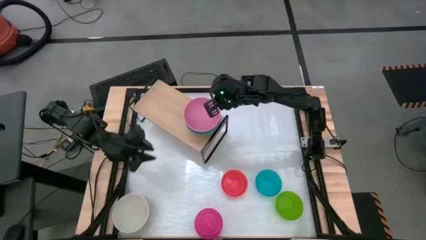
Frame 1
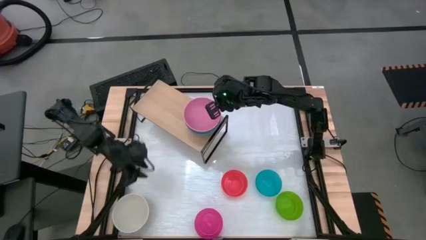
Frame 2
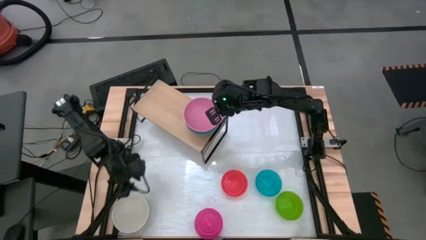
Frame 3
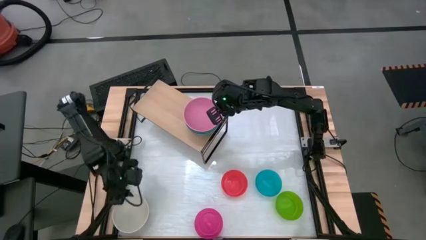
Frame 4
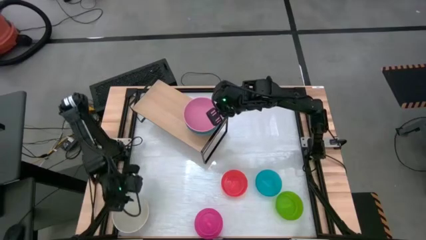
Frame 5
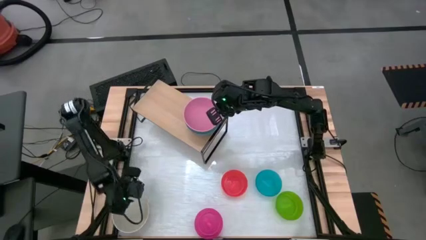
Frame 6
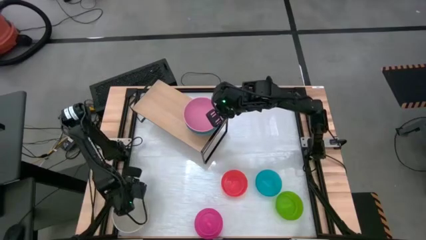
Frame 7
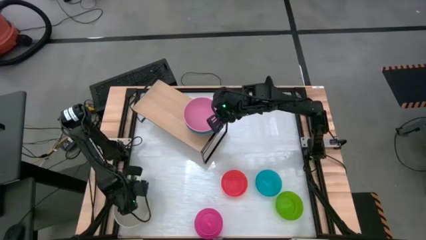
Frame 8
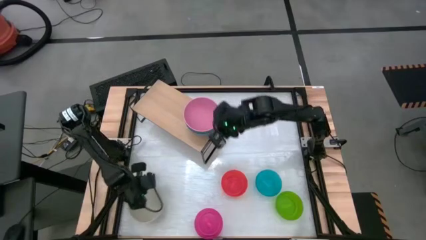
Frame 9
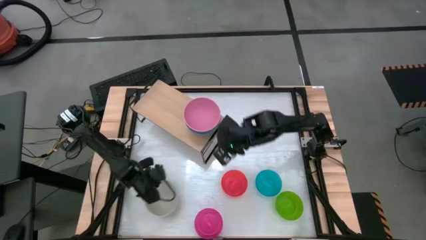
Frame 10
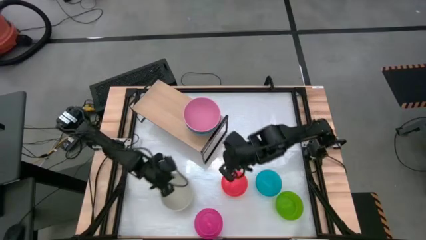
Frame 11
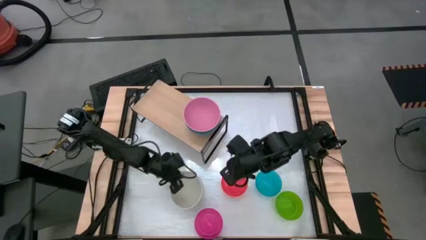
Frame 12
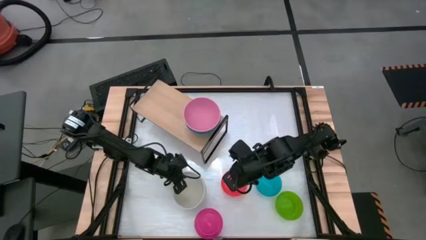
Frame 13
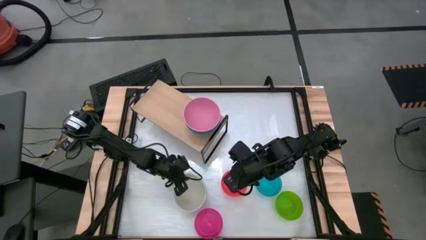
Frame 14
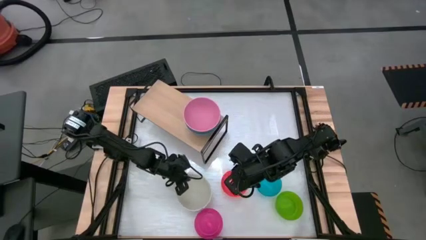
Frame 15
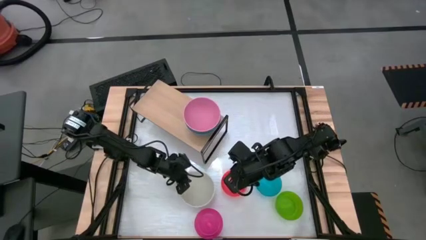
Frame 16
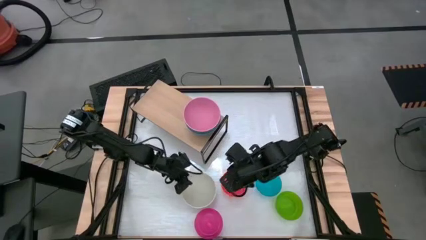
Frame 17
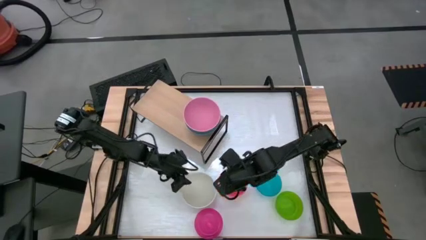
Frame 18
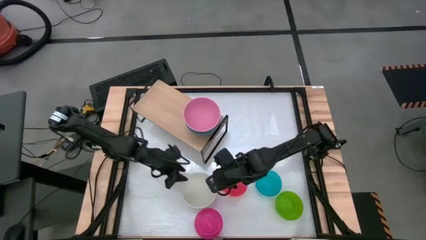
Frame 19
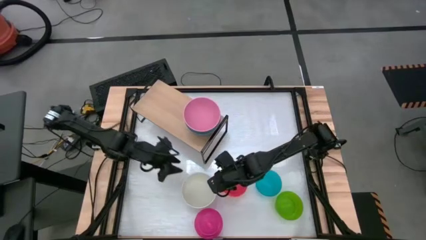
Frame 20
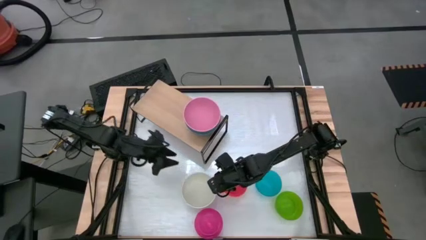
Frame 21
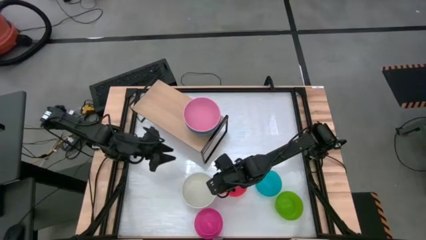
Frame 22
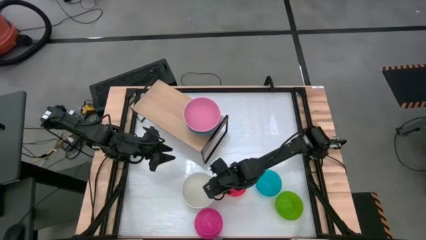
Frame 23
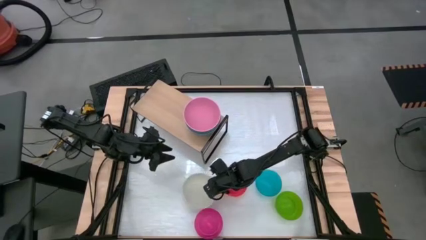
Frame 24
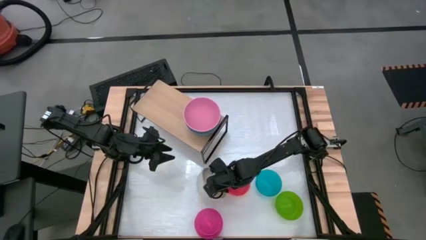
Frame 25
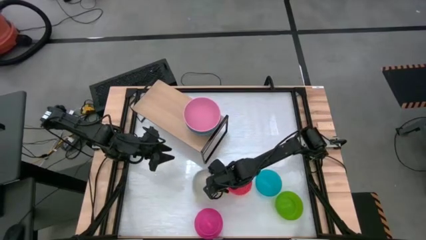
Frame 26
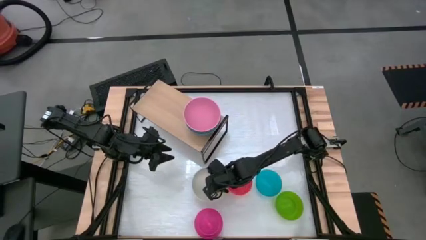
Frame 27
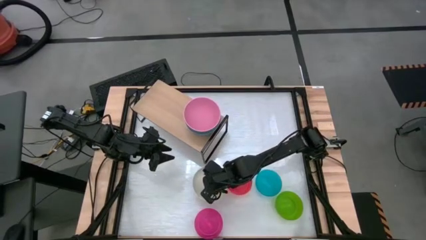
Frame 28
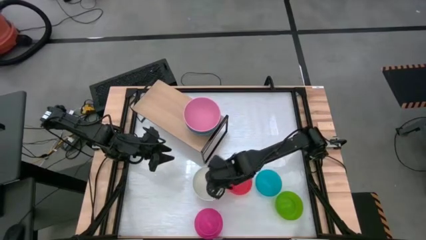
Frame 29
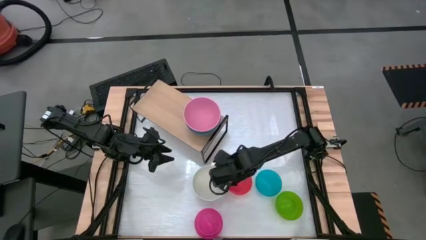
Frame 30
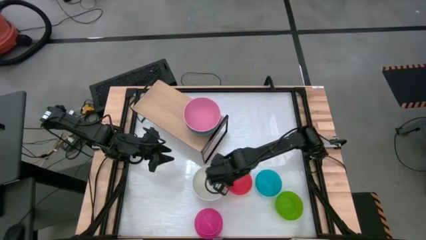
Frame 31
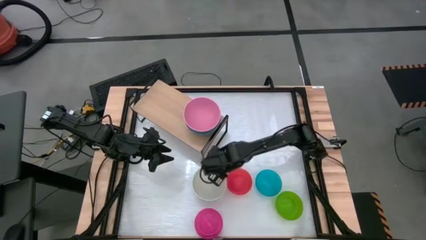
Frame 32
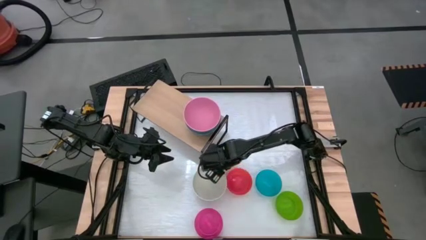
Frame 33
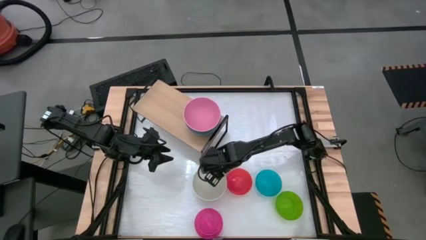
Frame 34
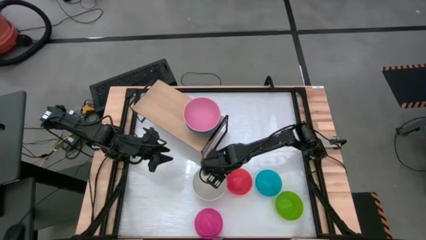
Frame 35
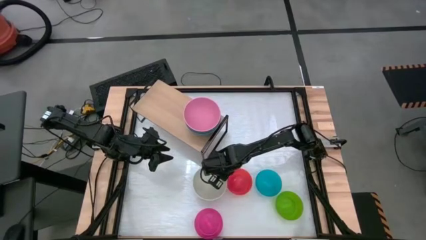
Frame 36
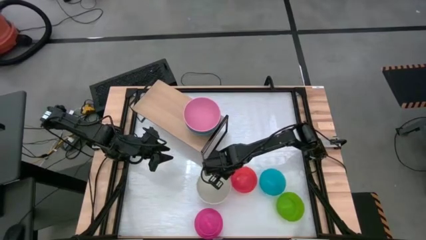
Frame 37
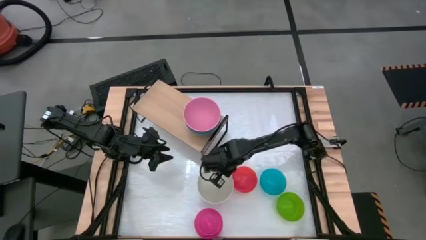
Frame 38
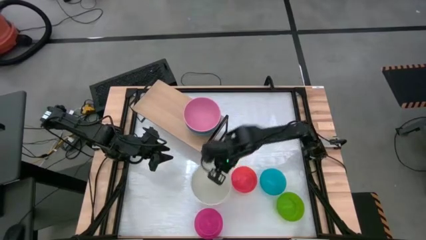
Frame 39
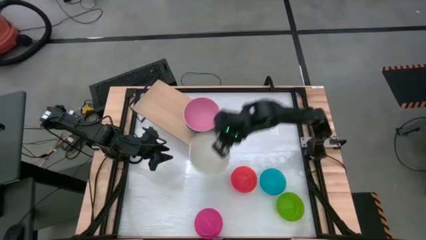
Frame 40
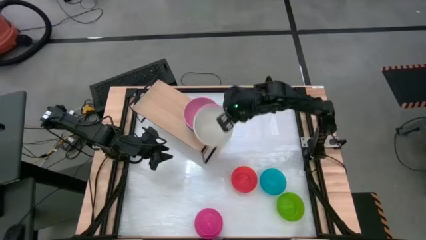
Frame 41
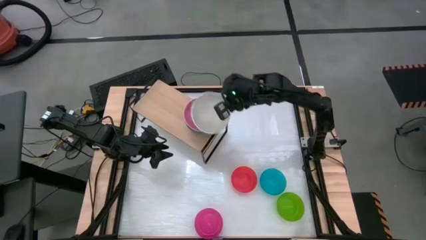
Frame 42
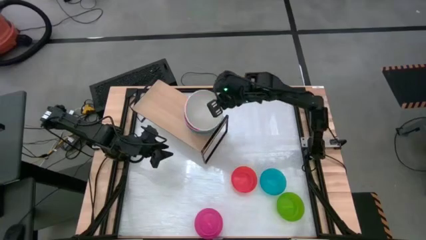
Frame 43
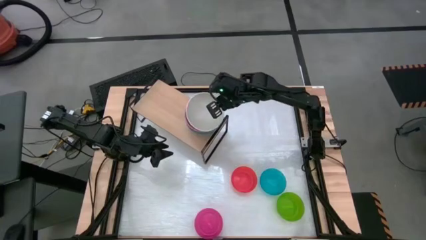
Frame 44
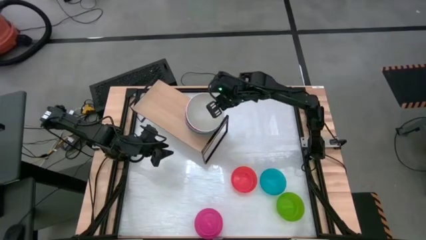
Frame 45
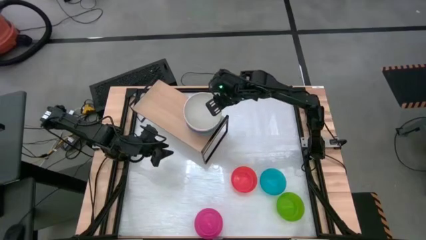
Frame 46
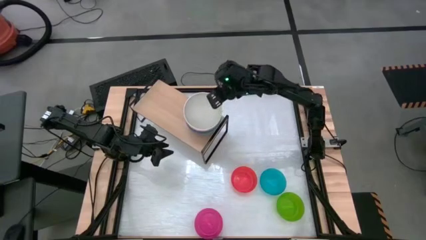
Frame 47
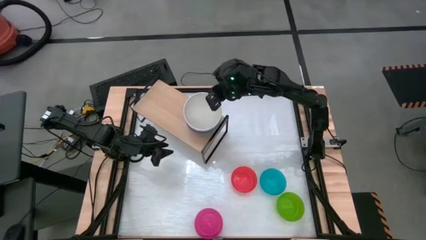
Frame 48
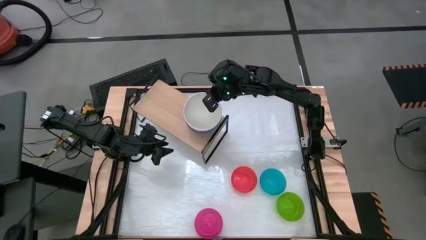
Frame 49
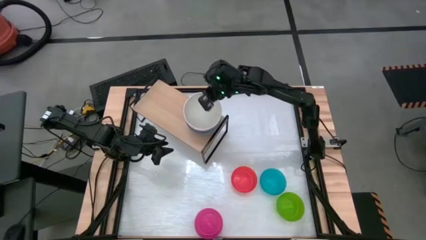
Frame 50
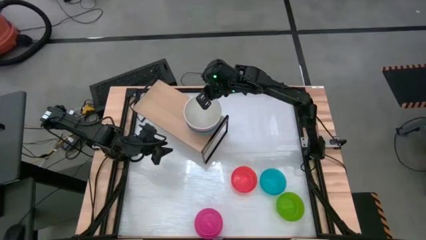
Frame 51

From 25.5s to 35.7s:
Task: Place and stack bowls onto a shelf
Stack the white bowl on top of the pink bowl on the shelf

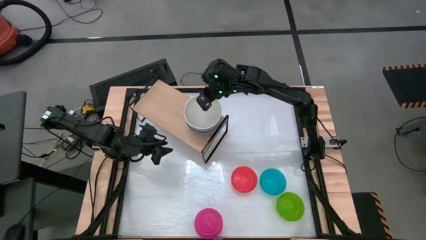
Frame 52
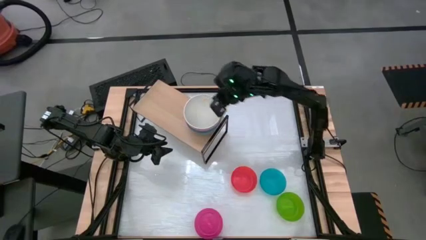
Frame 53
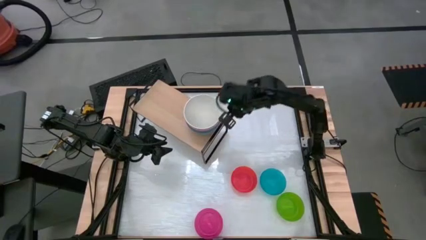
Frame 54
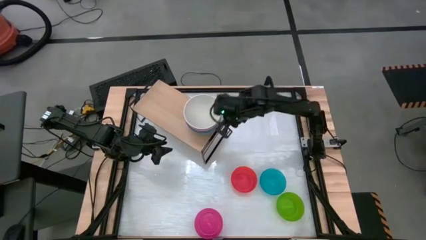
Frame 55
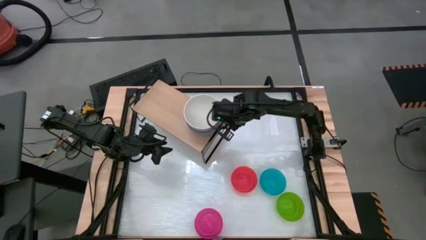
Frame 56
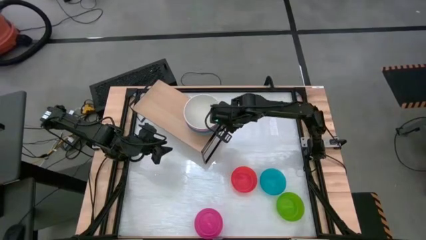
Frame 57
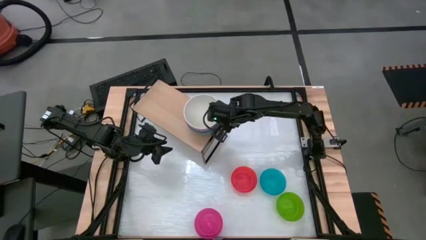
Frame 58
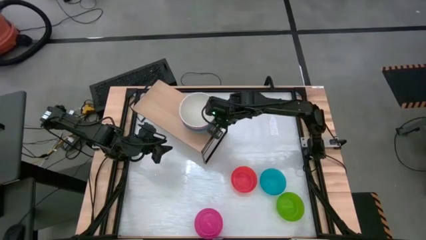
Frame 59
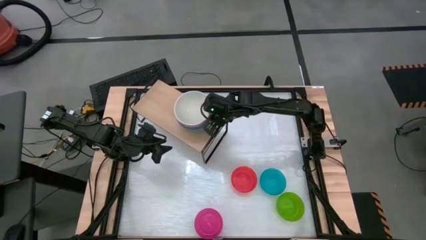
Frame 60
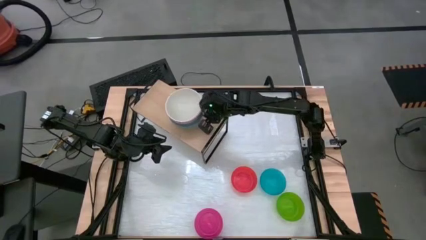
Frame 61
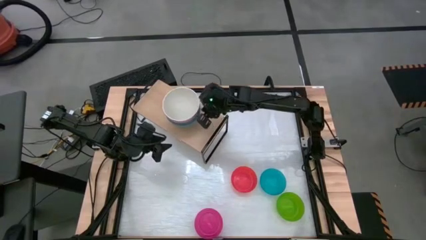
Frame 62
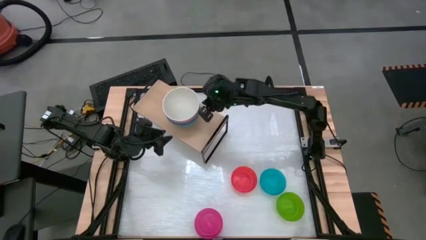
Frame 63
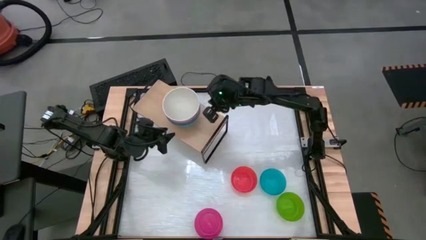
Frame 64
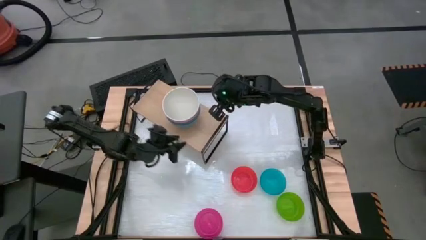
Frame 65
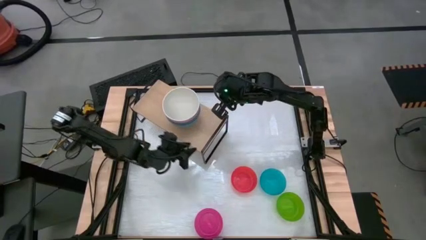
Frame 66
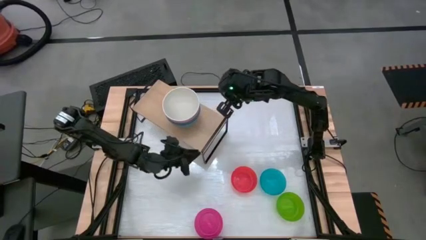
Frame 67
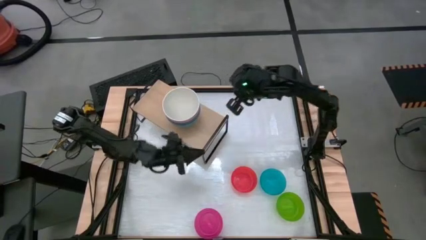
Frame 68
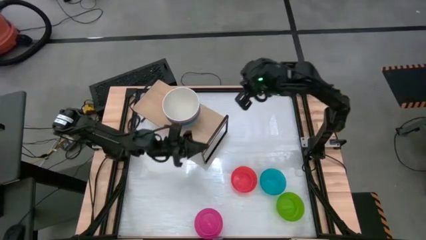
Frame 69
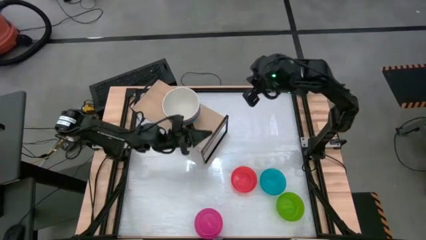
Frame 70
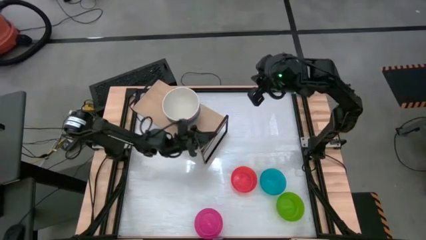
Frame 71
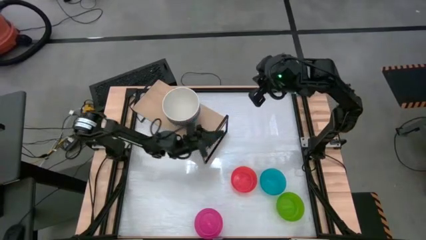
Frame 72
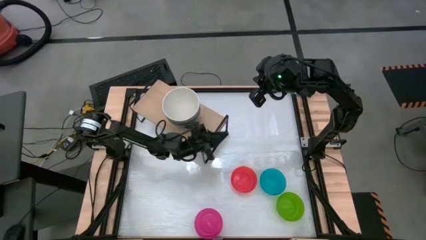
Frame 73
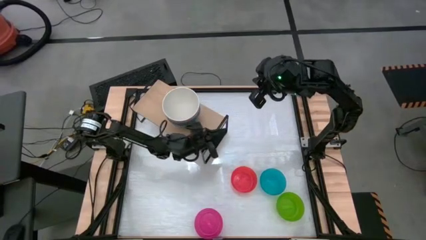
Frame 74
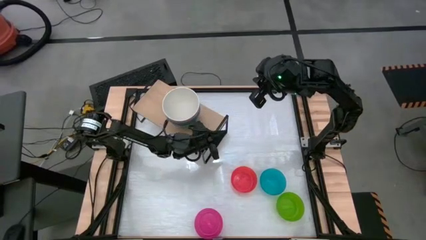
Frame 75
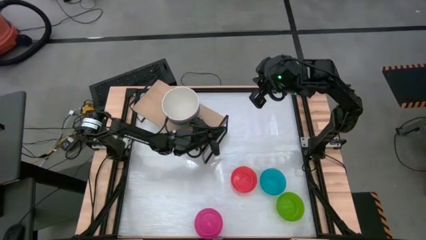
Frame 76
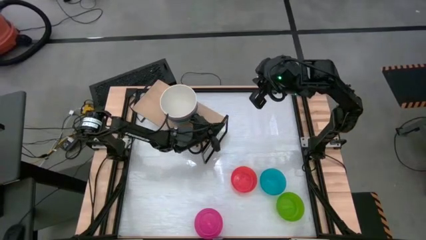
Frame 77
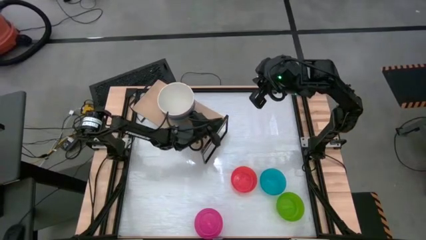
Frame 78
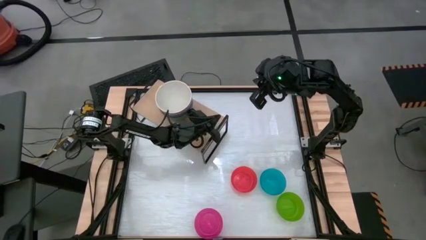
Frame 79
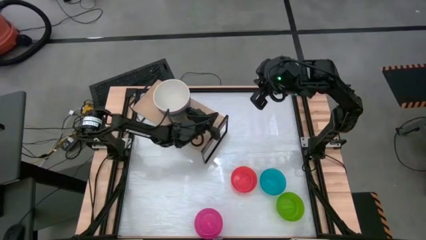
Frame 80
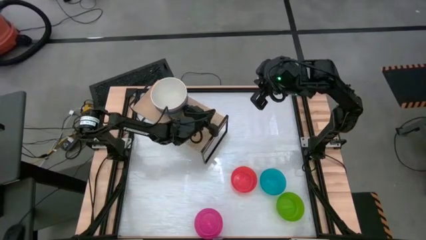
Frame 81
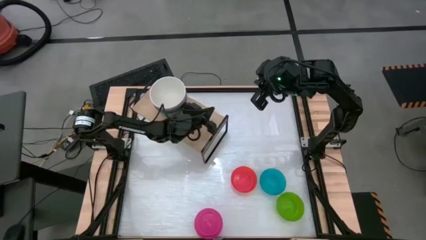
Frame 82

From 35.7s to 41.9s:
Adjust the stacked bowls on the shelf
